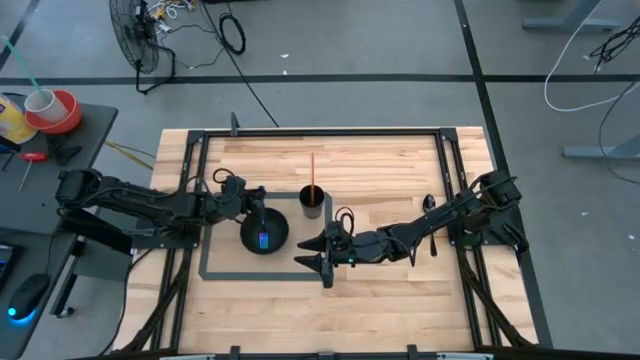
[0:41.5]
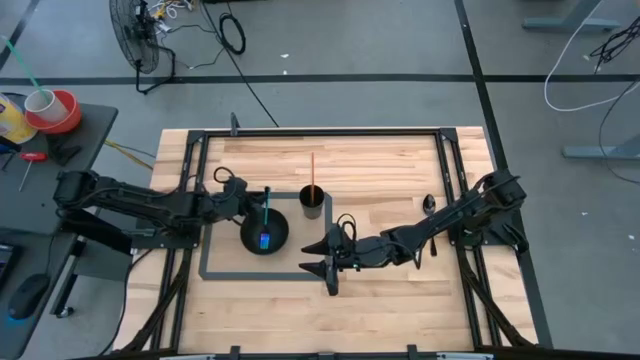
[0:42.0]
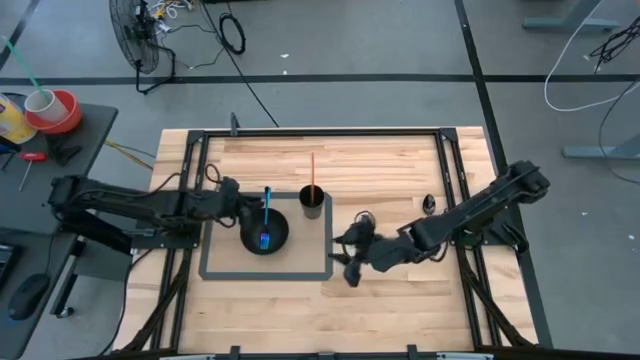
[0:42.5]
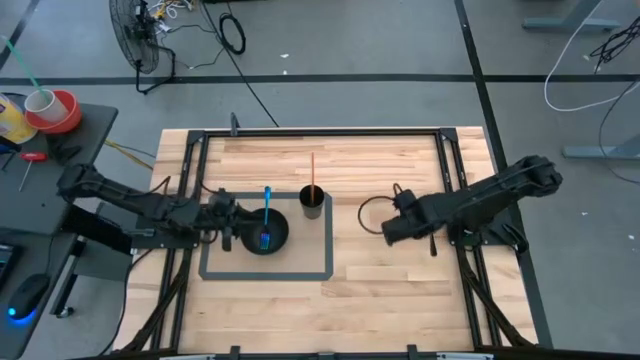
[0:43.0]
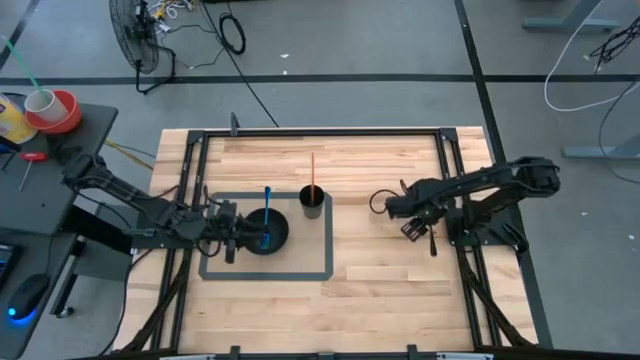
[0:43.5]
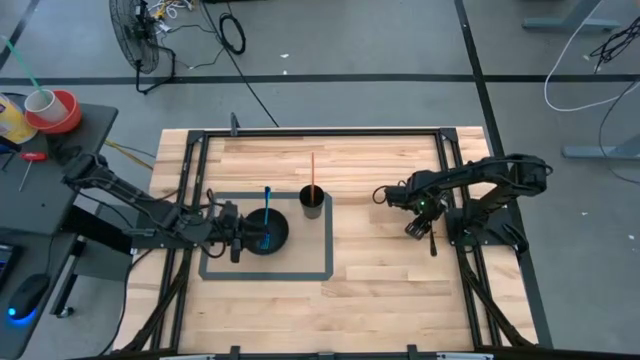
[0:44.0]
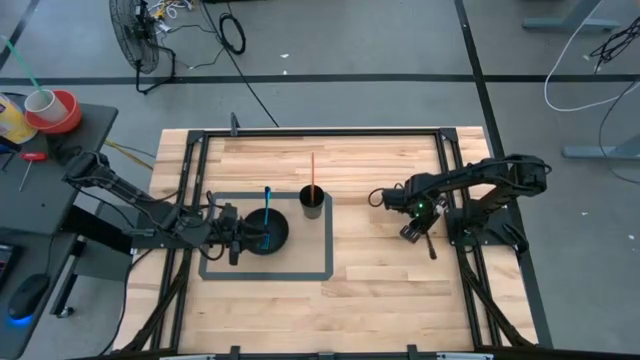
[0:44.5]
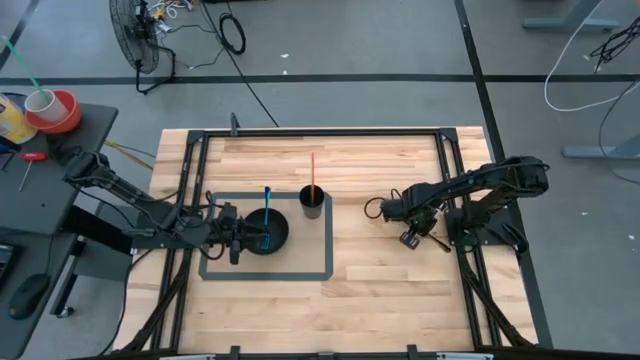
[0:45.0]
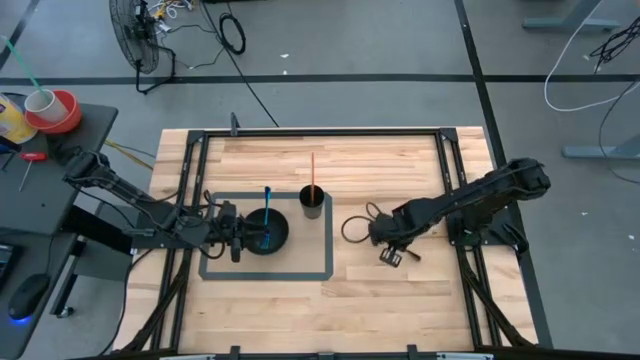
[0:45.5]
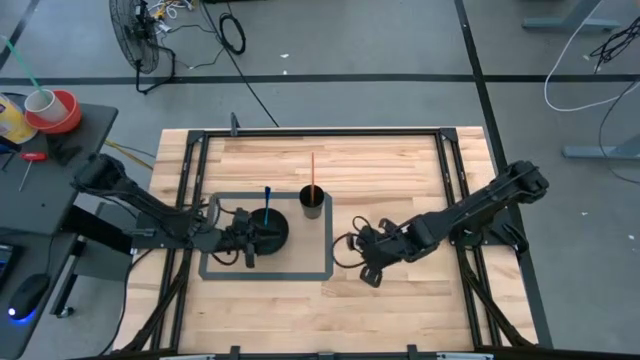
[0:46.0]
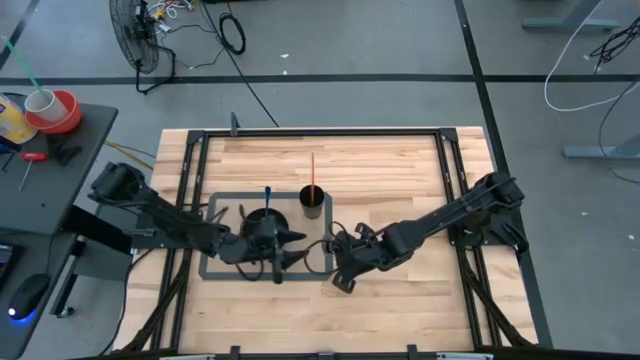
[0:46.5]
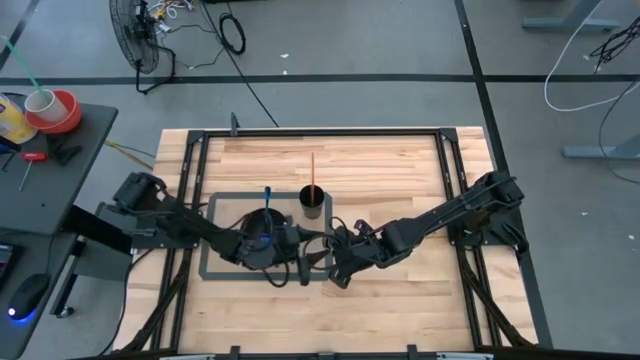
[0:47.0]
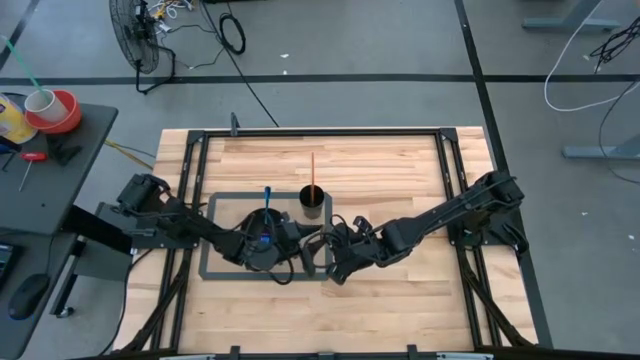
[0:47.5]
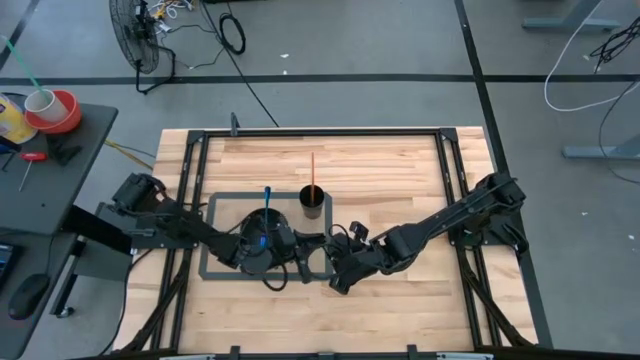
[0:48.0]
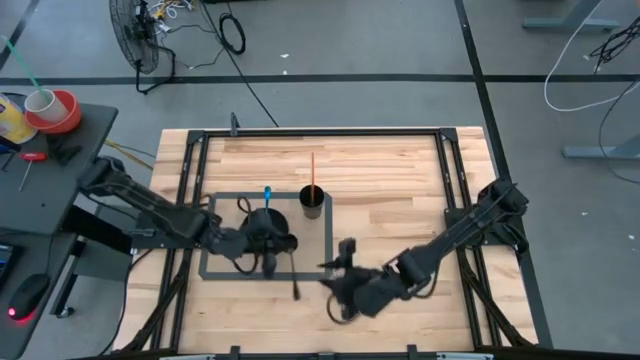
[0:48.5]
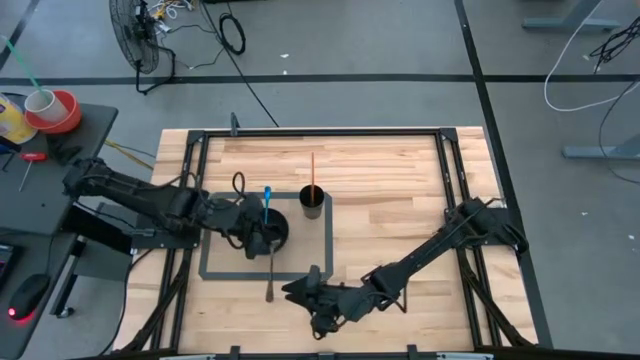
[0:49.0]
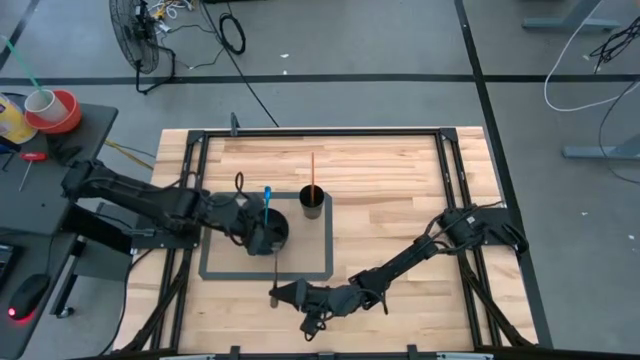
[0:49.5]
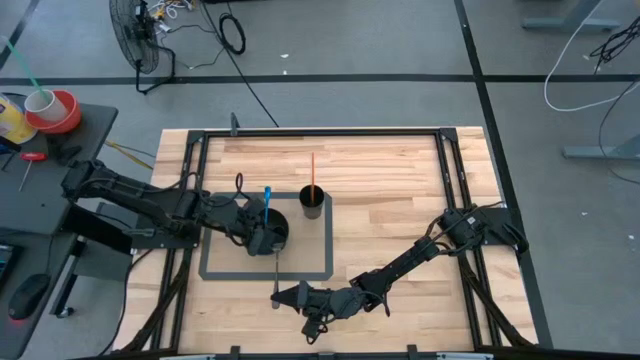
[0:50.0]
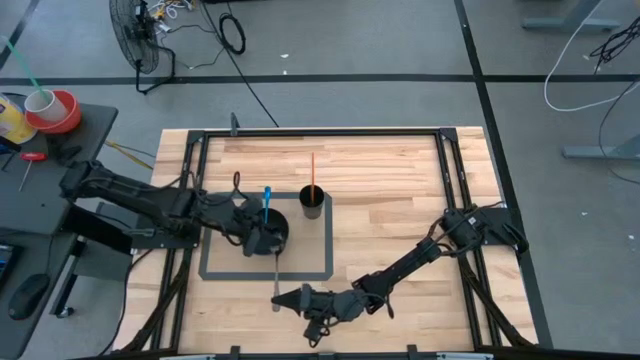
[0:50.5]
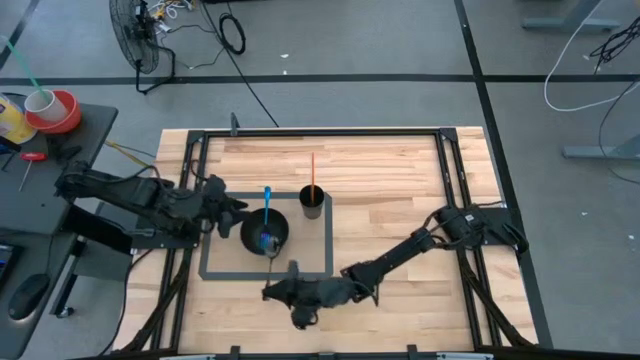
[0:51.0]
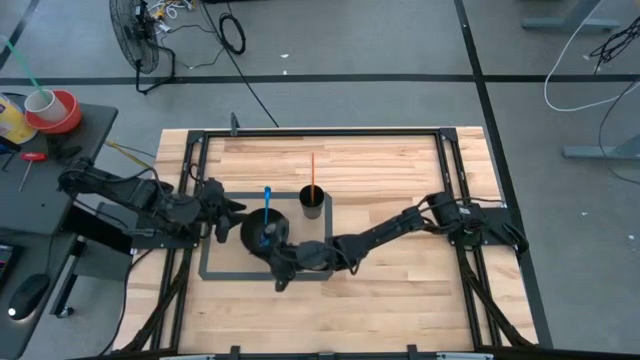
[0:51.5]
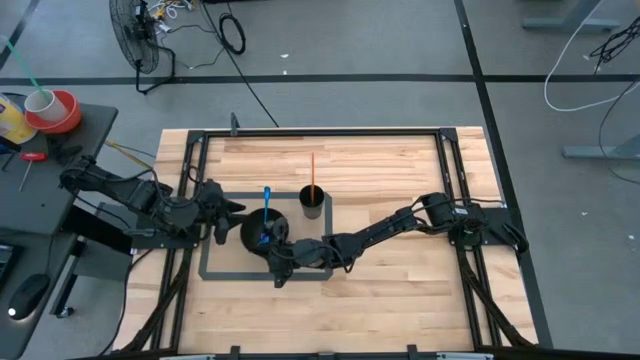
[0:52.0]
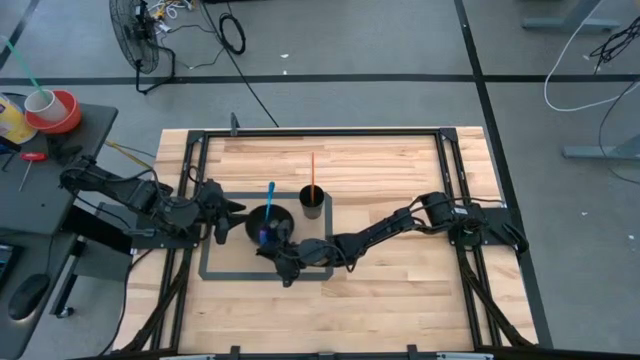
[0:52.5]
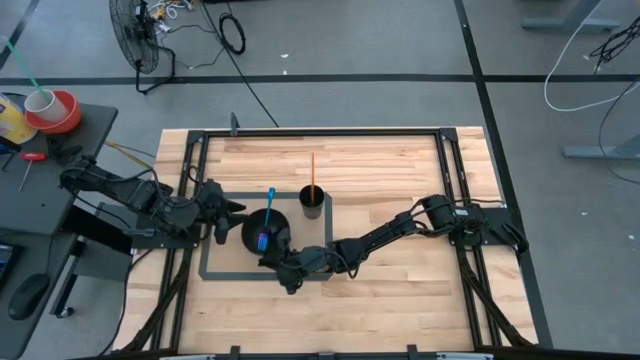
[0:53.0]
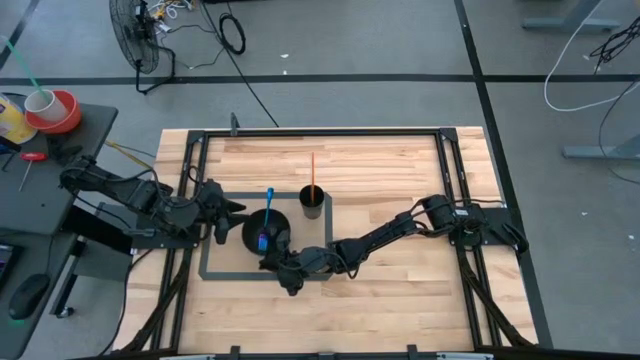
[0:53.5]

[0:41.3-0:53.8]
Task: Pick & Place Utensil
Put the spoon into the black bowl on the table mat

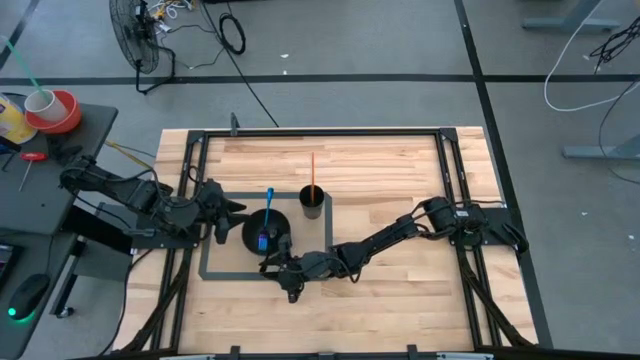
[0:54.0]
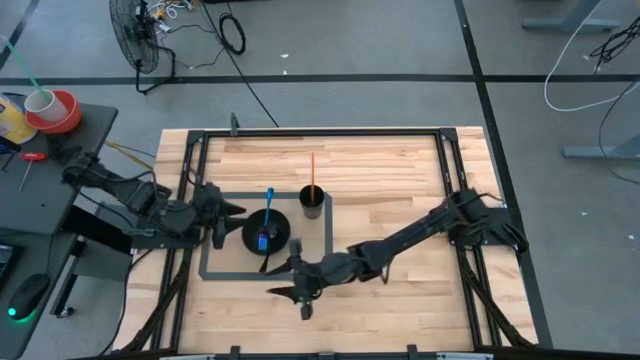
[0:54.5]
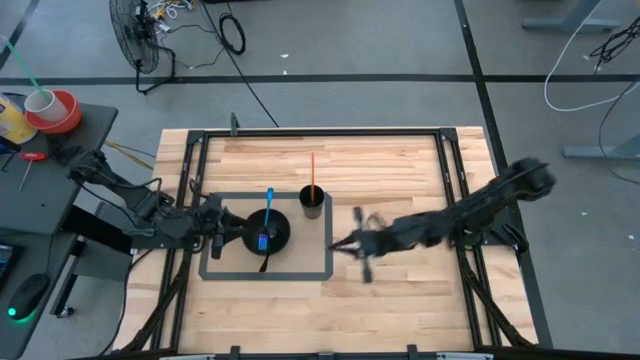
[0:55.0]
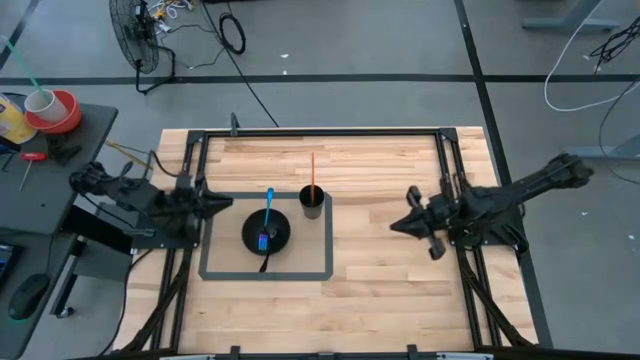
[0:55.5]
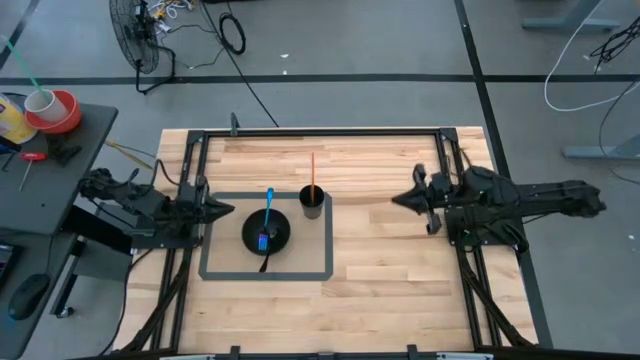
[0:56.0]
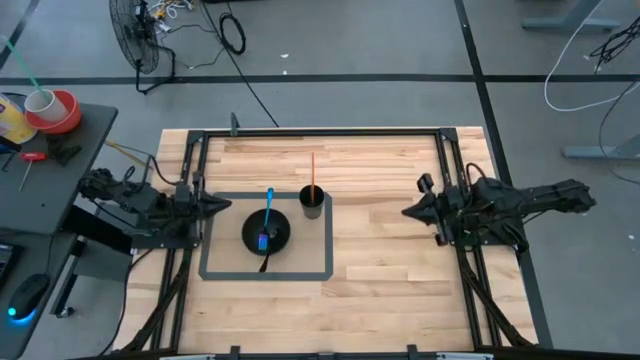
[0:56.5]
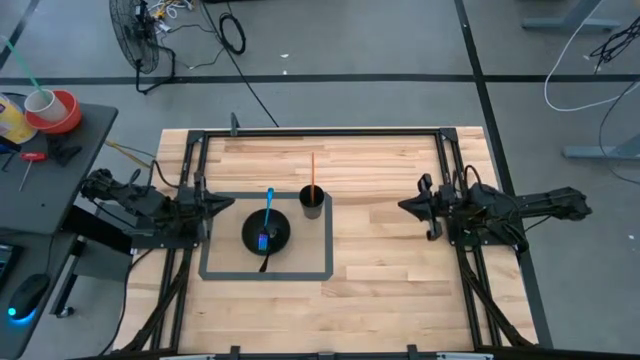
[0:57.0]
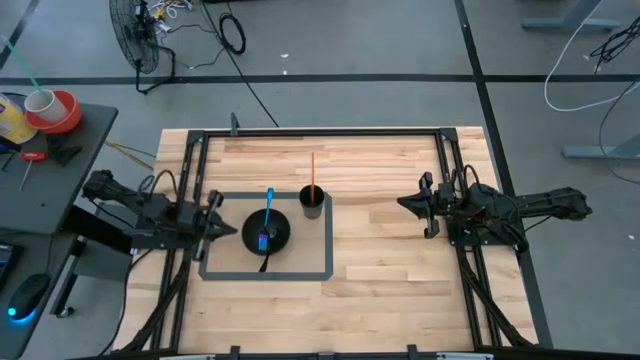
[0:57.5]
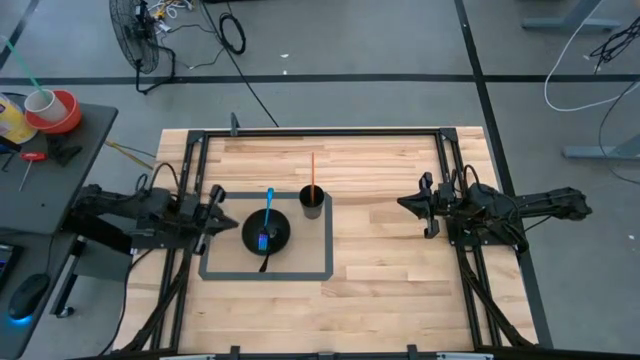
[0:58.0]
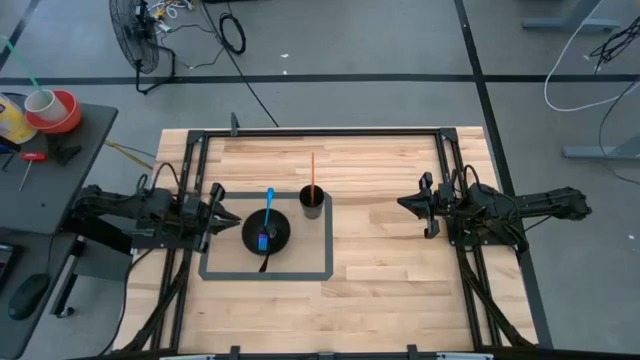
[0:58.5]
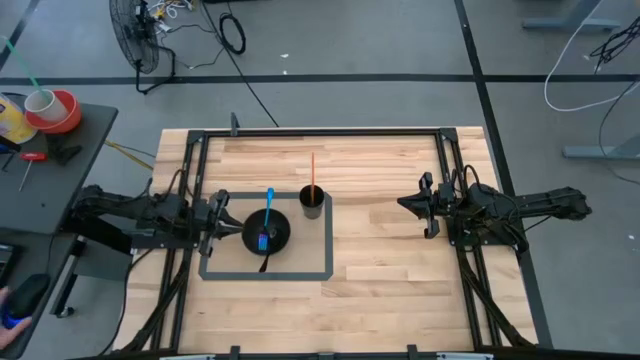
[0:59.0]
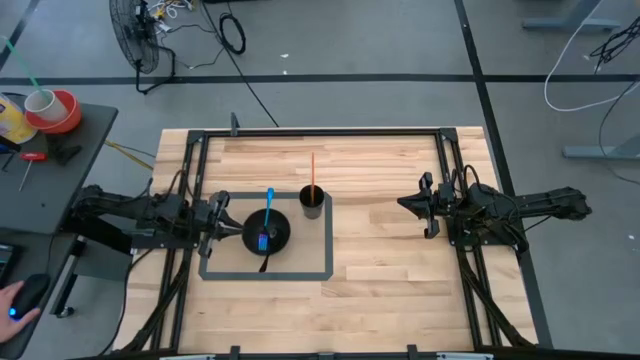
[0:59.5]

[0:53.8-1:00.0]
Return to Home Position

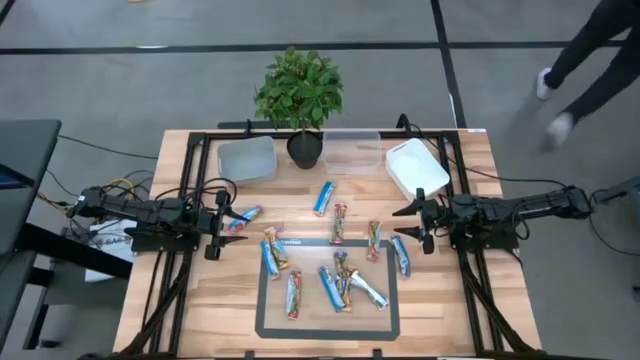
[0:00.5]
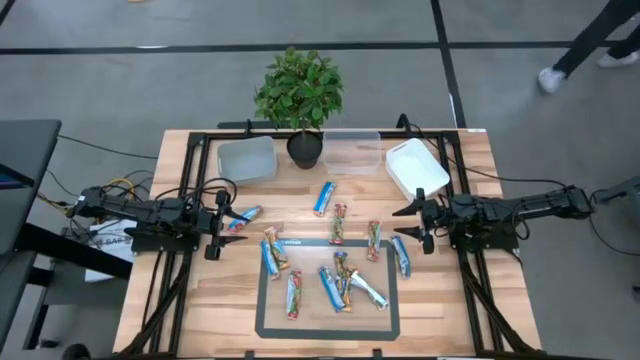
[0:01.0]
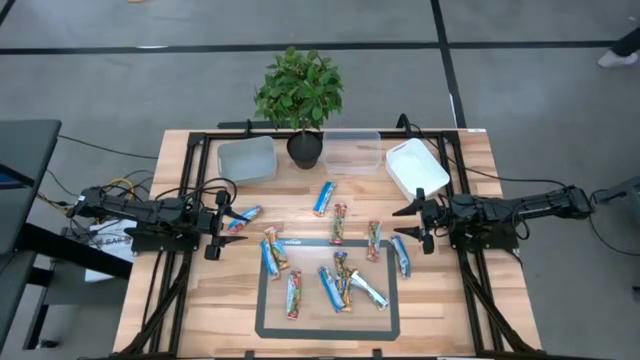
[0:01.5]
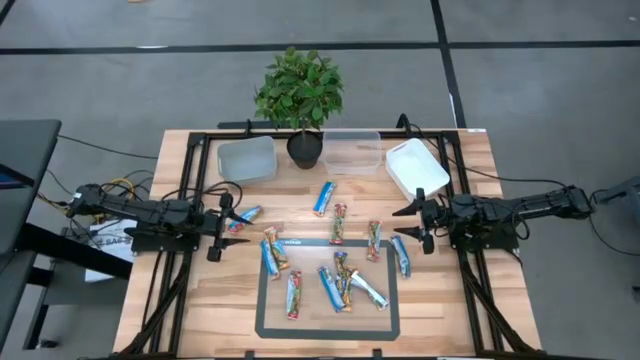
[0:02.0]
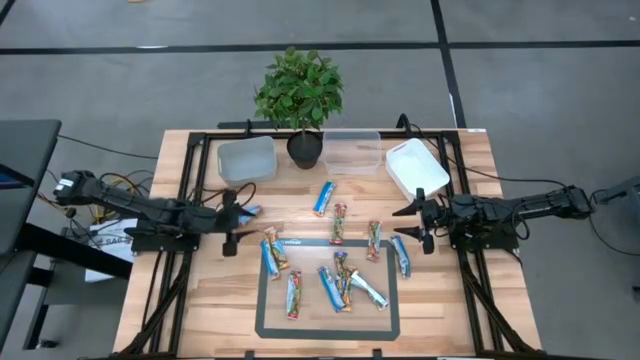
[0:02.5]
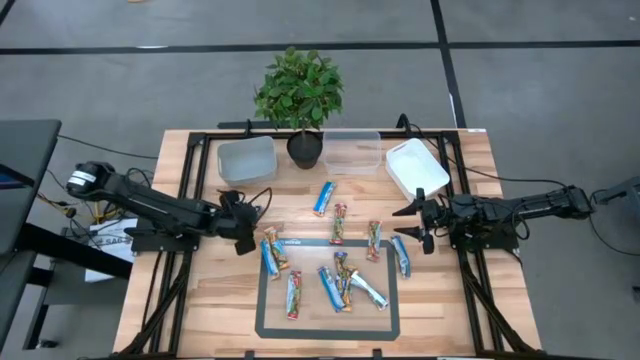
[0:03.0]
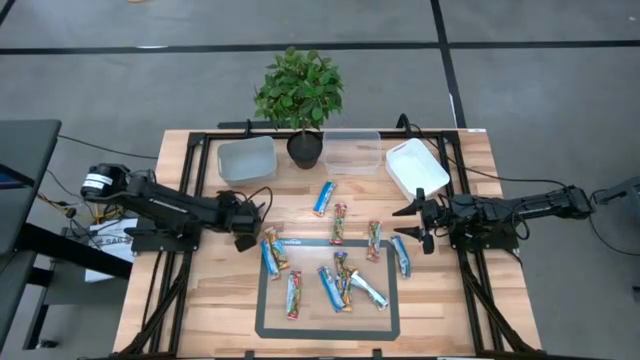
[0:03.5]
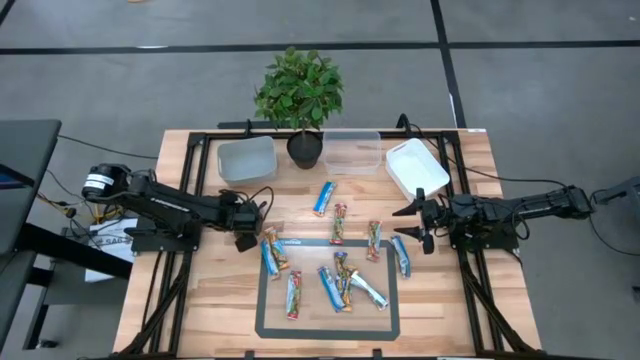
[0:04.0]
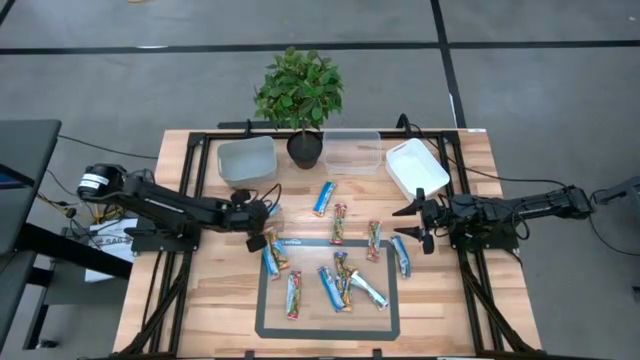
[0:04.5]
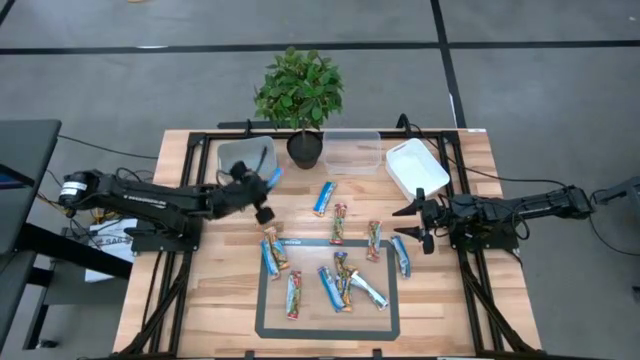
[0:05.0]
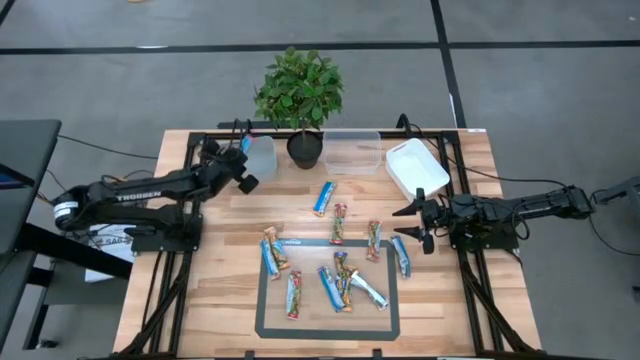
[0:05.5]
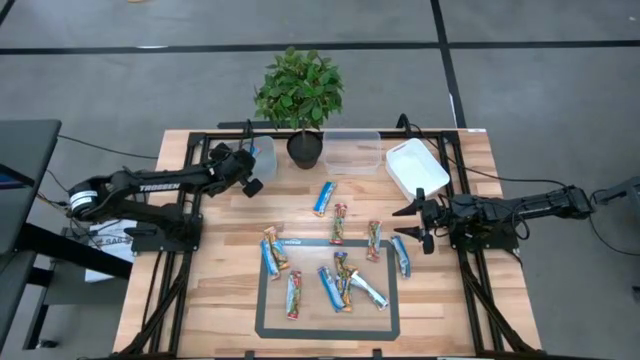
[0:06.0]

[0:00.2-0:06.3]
Task: Pick and place Granola Bars by type
Put the red granola bar into the gray bin
